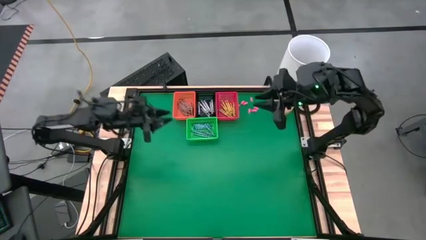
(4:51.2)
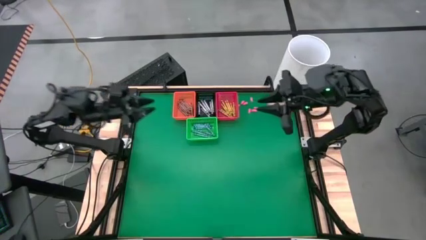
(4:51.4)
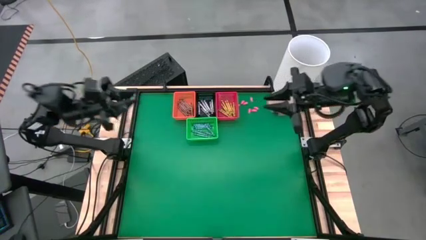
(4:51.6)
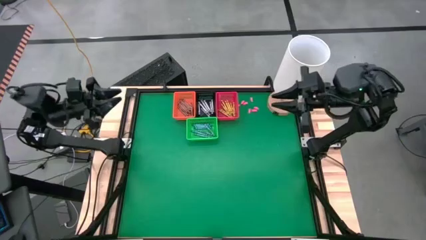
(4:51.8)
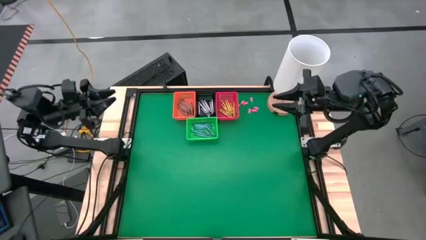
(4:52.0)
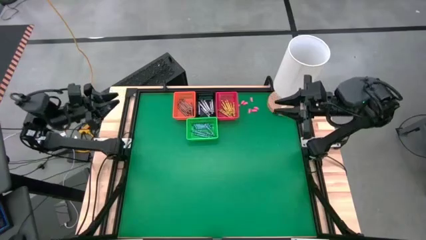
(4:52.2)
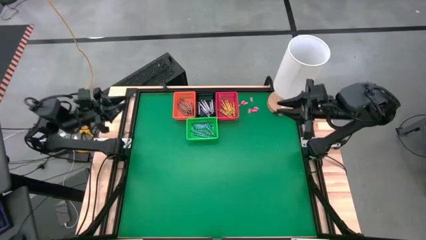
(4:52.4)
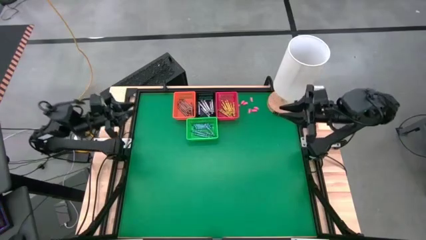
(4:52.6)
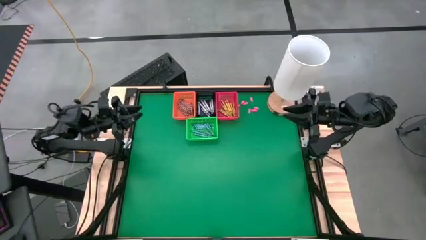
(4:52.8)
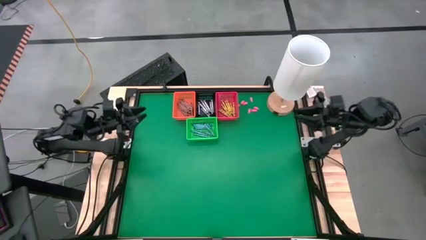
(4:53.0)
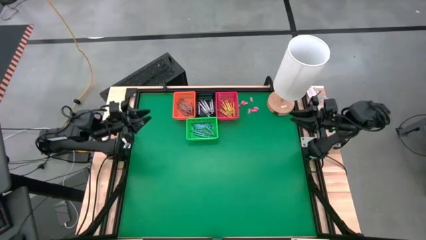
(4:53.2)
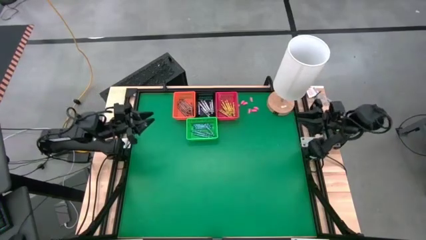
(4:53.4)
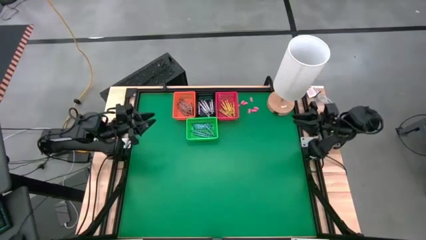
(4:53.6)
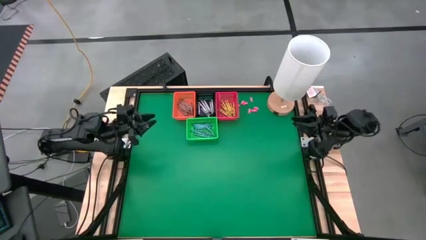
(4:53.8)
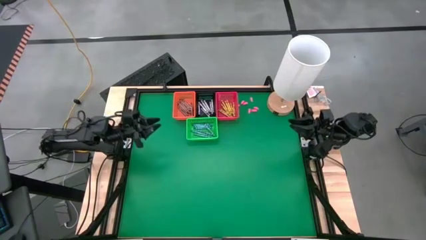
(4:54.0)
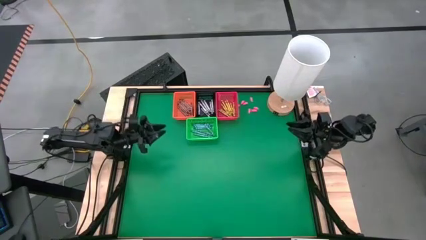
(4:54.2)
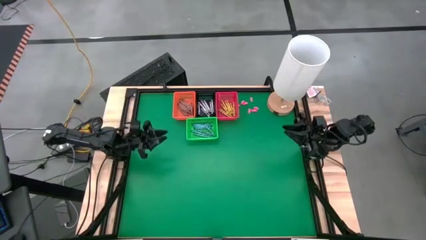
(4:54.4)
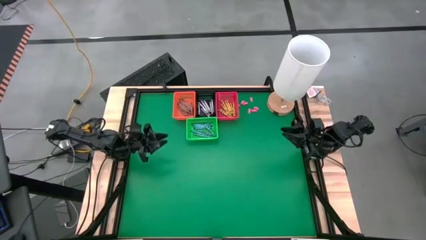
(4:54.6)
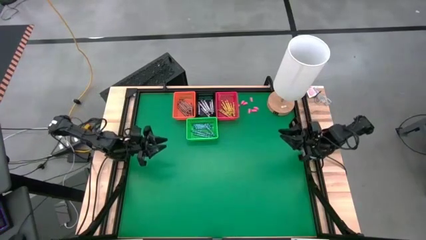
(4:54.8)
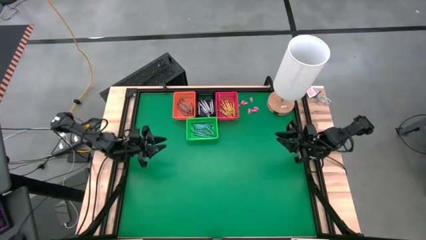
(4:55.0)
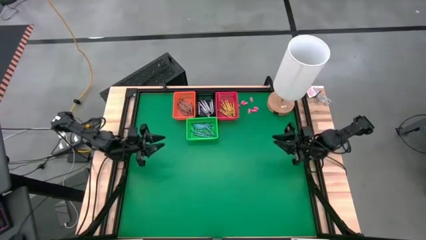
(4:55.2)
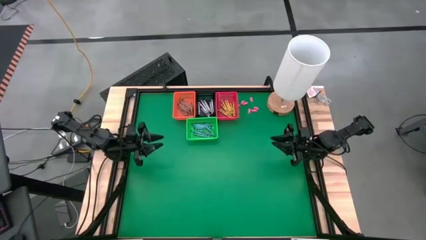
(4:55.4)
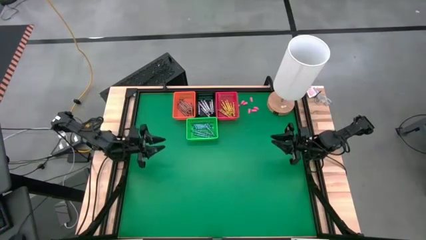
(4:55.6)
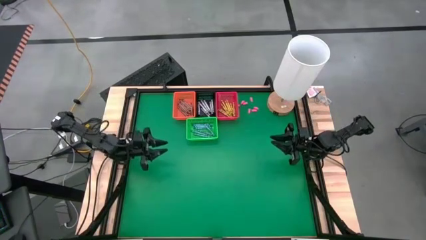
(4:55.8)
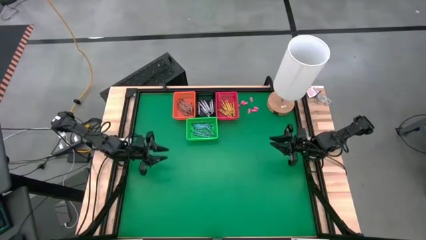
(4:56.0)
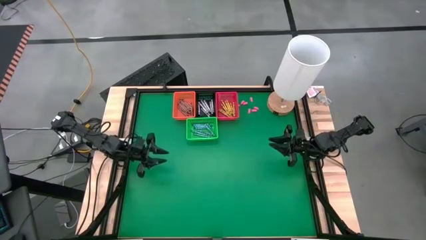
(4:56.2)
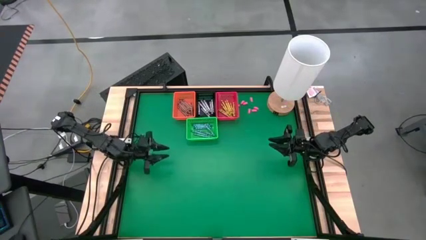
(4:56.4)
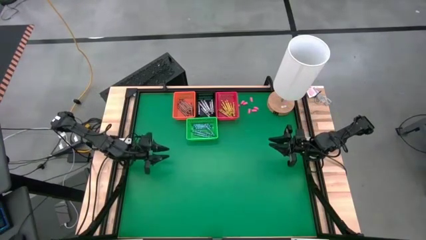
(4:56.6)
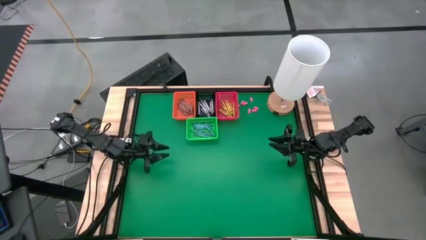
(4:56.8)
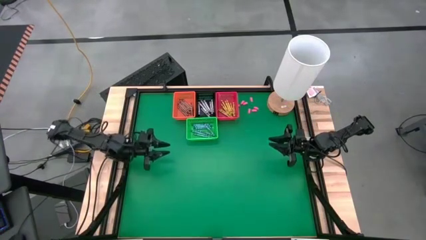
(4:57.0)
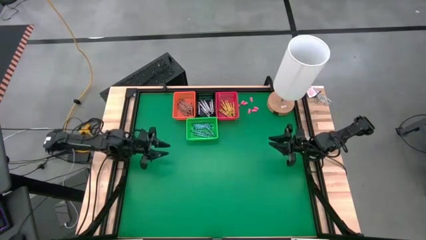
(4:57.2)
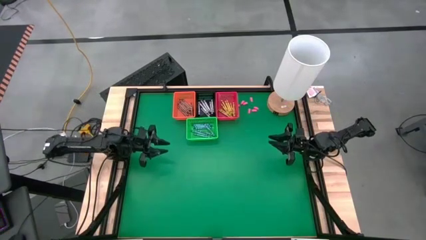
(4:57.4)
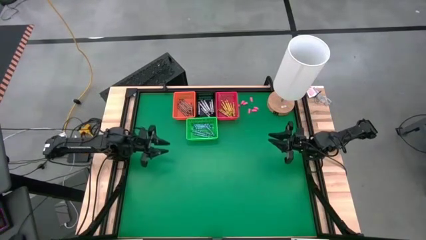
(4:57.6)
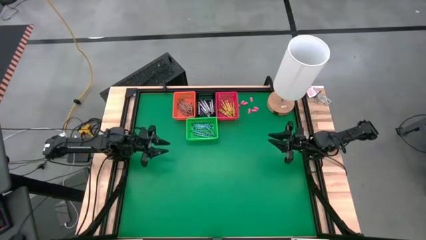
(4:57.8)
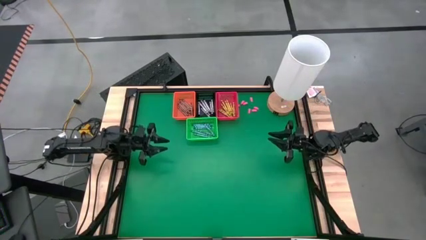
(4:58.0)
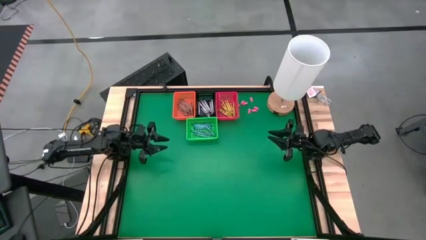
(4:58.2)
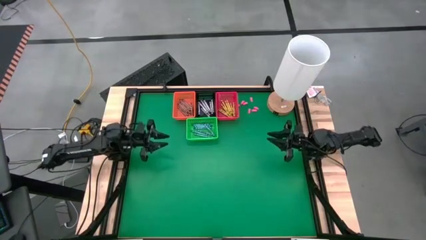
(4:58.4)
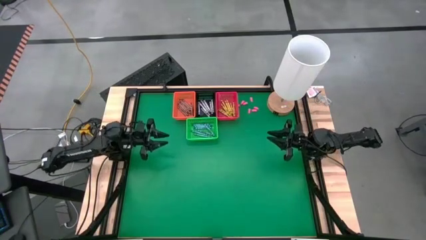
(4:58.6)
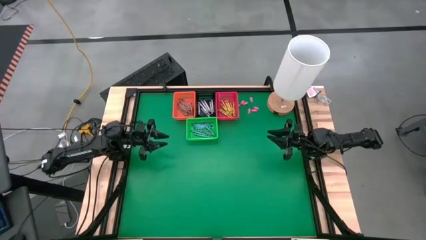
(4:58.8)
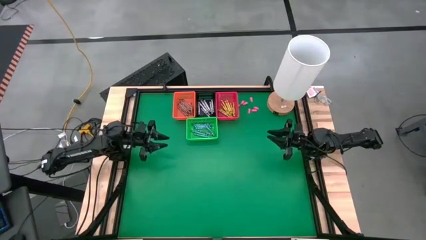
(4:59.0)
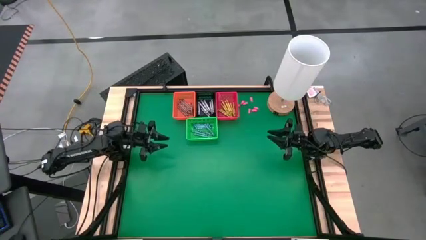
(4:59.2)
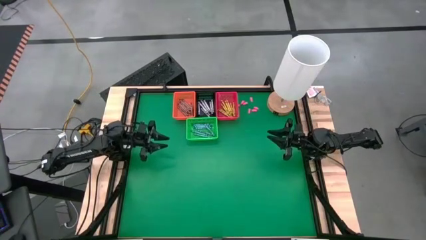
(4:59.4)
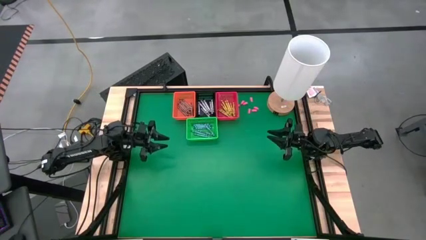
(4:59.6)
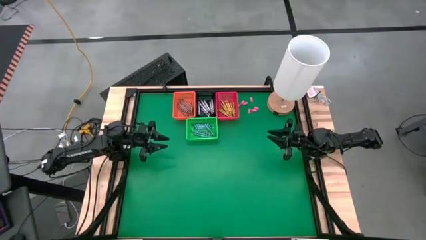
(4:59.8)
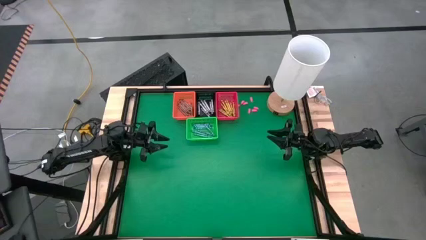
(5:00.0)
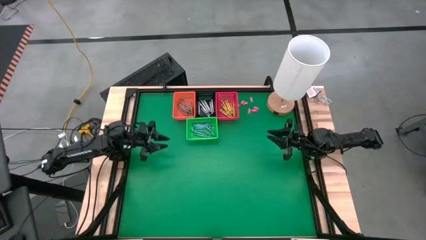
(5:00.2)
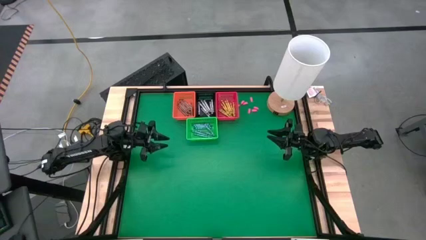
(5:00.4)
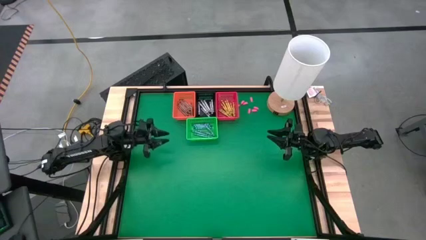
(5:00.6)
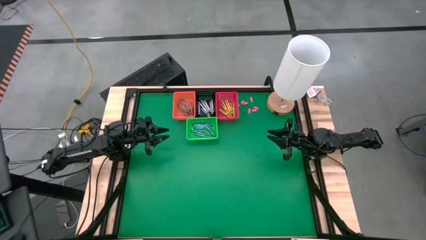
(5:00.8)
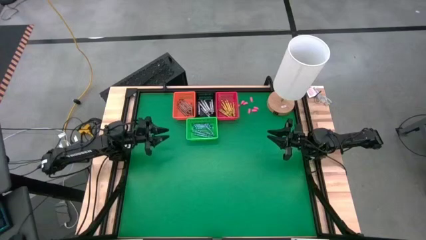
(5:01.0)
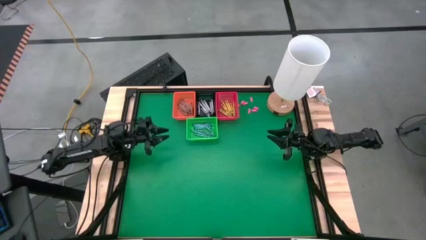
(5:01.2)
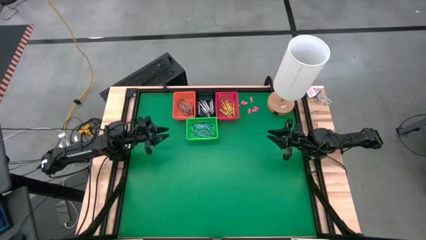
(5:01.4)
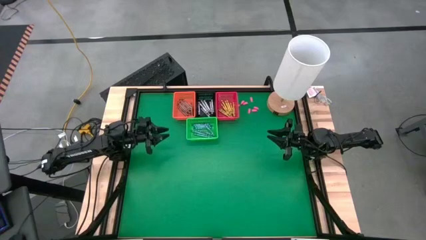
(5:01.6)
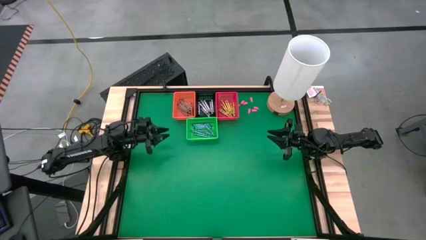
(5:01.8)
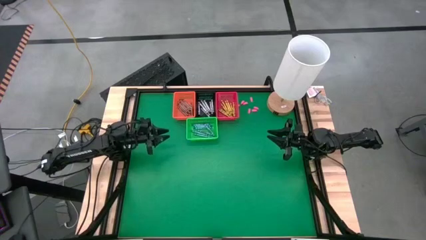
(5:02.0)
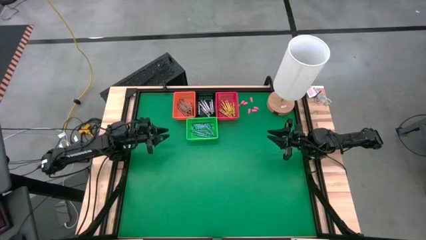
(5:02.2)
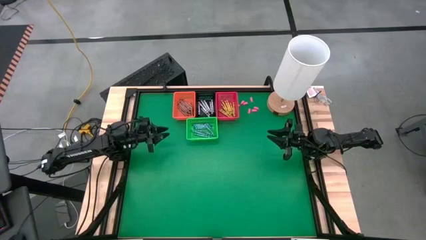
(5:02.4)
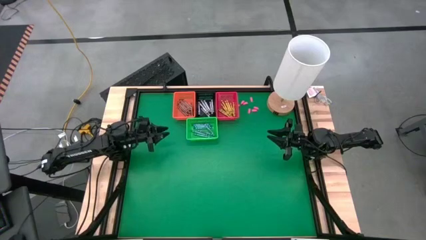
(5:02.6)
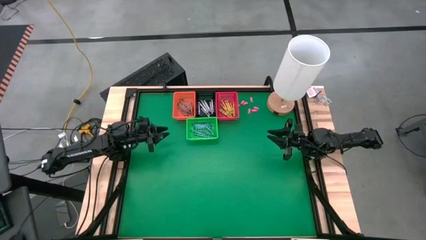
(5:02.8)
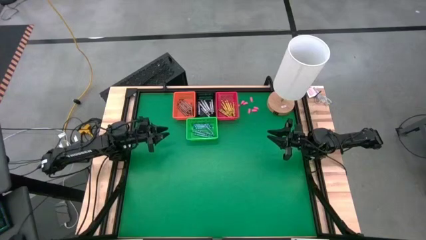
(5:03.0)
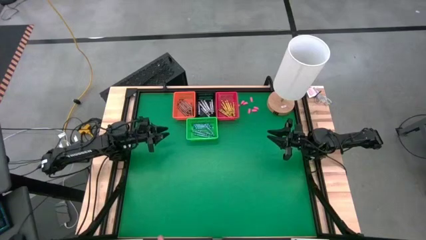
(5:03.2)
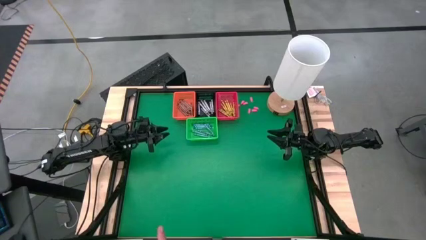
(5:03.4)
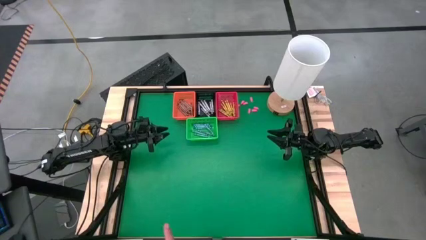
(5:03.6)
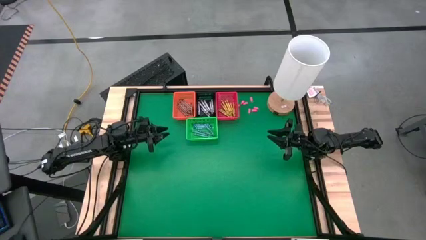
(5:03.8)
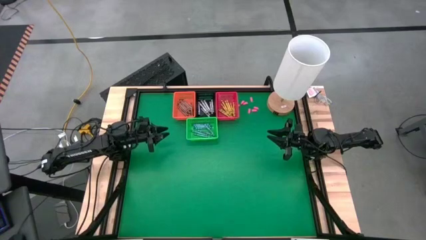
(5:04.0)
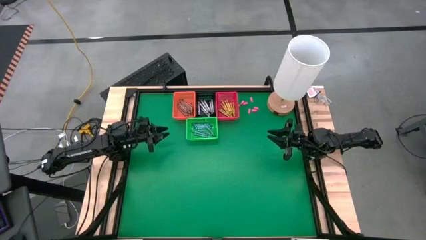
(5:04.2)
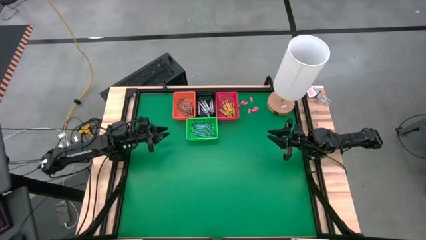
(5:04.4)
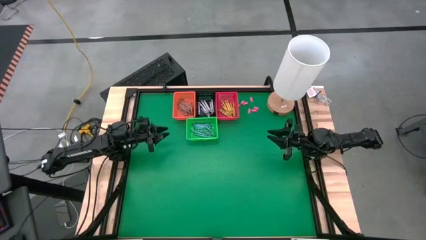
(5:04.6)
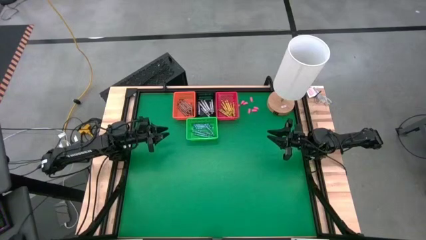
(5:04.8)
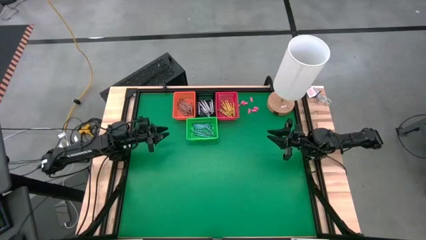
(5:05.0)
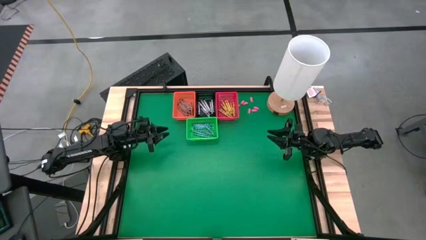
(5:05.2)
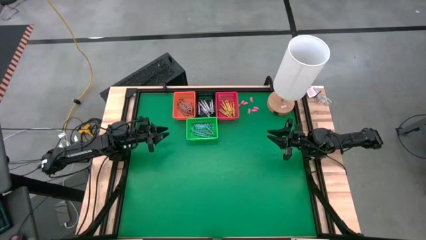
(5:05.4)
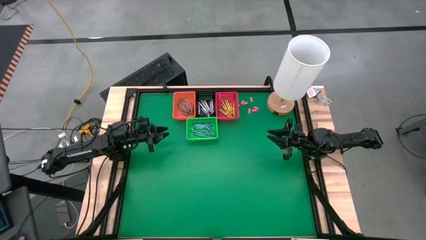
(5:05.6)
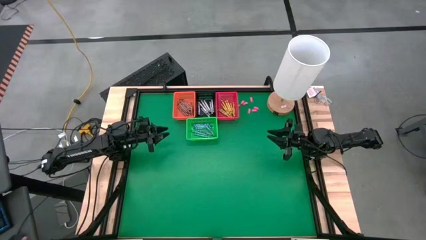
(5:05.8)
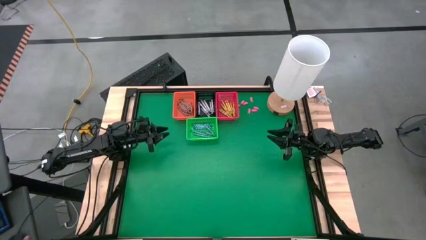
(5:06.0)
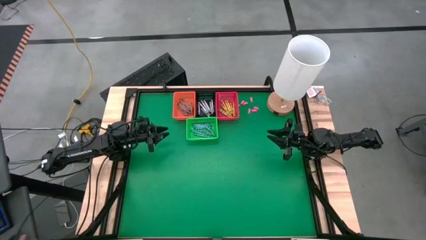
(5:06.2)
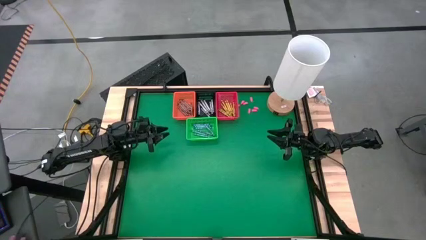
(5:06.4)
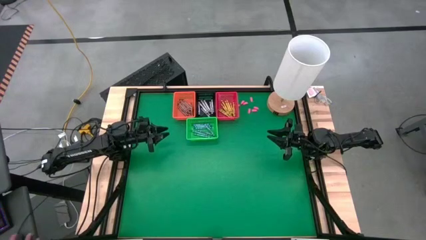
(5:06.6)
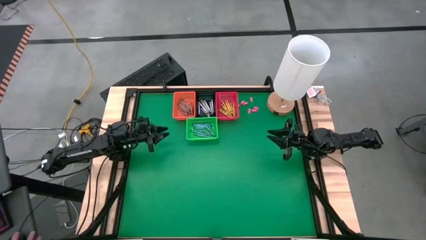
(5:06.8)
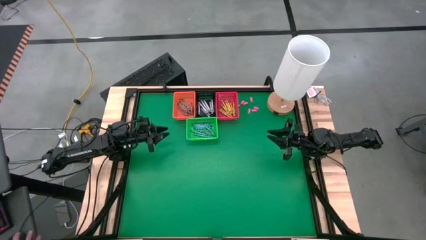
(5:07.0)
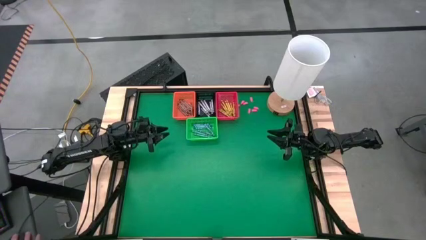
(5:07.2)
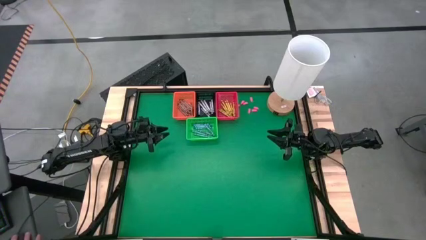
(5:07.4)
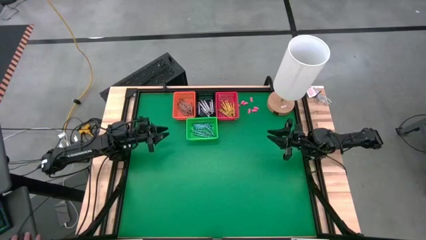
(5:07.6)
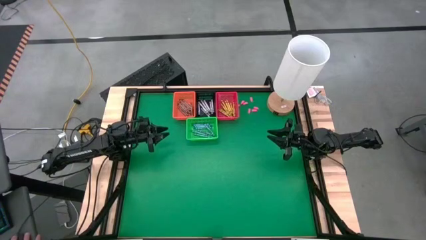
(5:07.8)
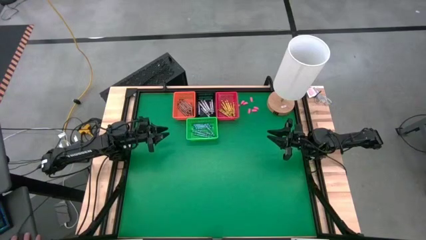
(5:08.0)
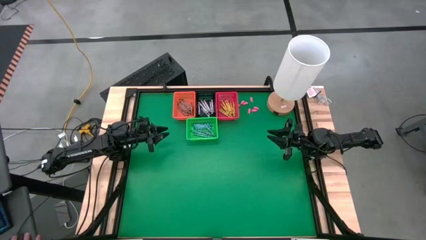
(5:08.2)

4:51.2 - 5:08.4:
Task: Sort crayons
Return to Home Position
